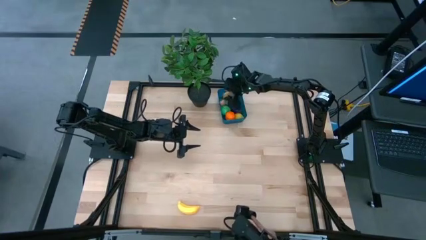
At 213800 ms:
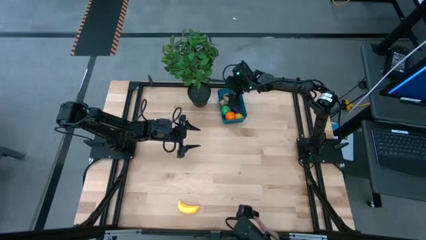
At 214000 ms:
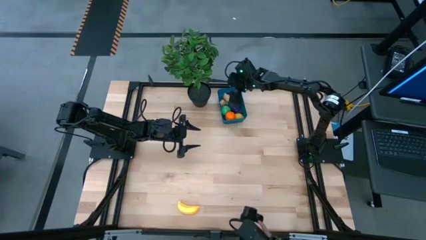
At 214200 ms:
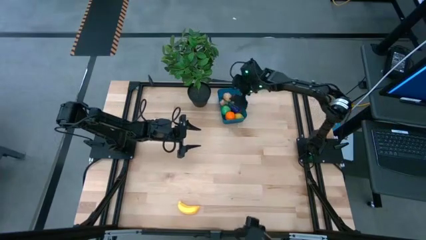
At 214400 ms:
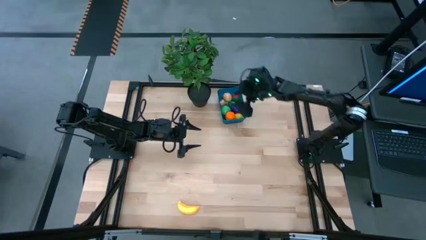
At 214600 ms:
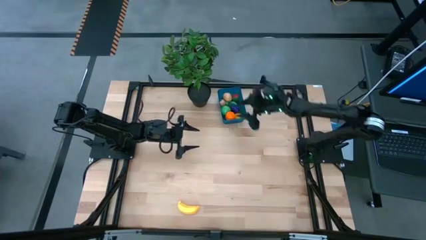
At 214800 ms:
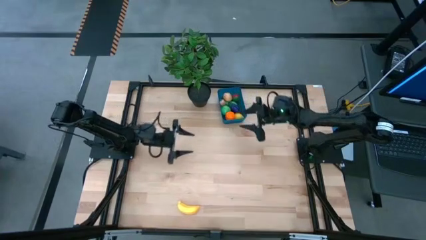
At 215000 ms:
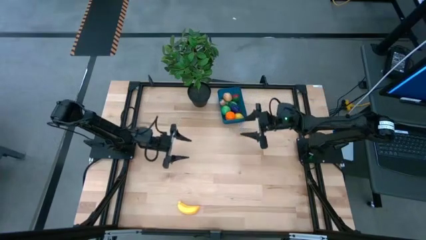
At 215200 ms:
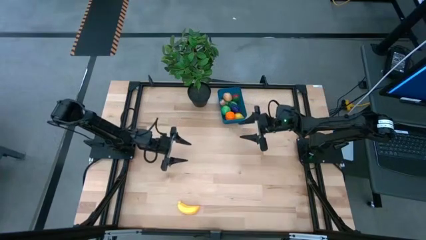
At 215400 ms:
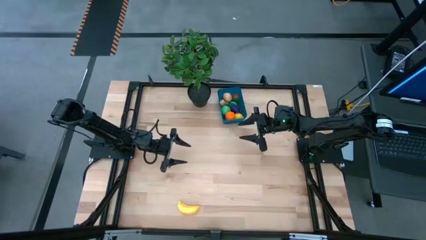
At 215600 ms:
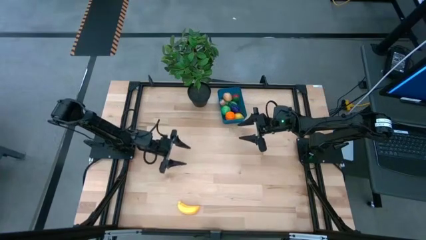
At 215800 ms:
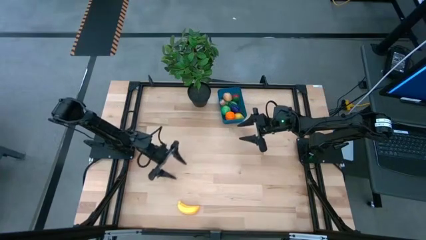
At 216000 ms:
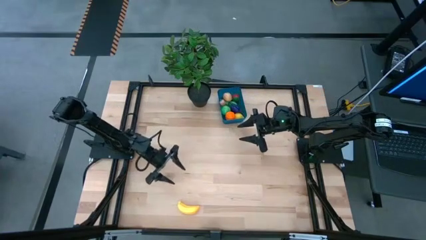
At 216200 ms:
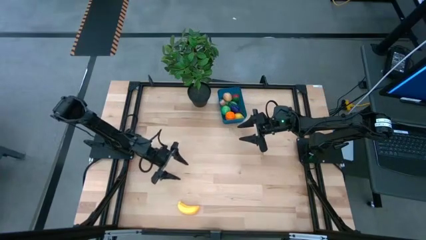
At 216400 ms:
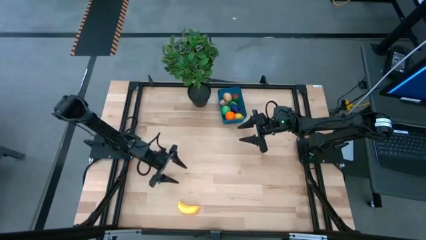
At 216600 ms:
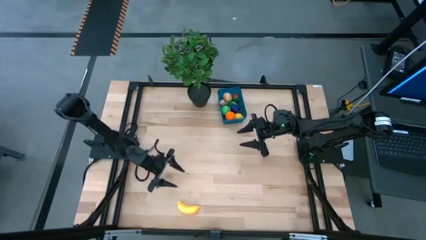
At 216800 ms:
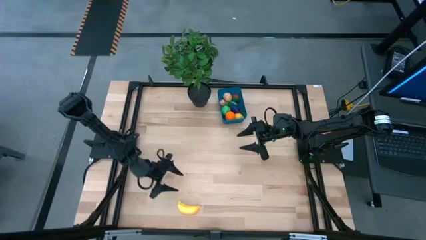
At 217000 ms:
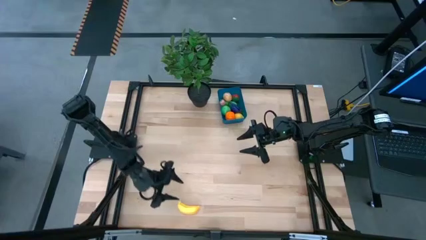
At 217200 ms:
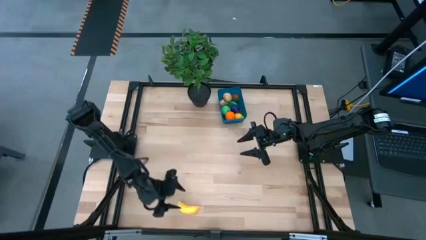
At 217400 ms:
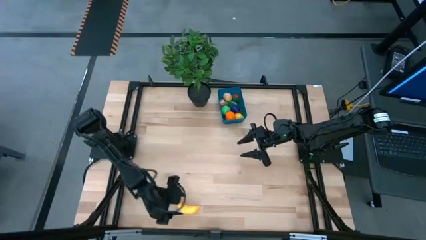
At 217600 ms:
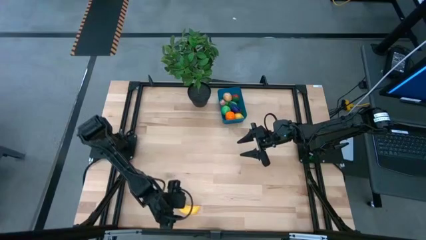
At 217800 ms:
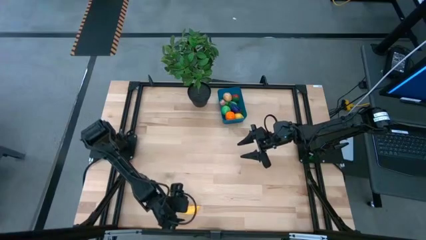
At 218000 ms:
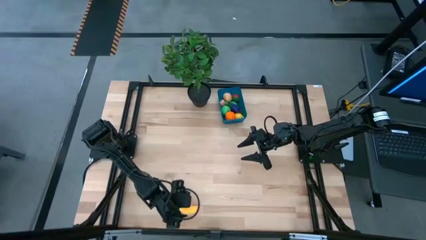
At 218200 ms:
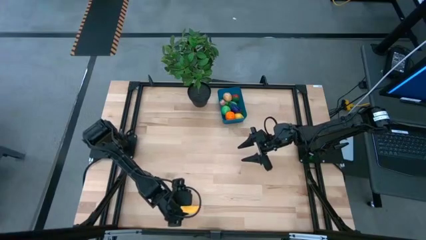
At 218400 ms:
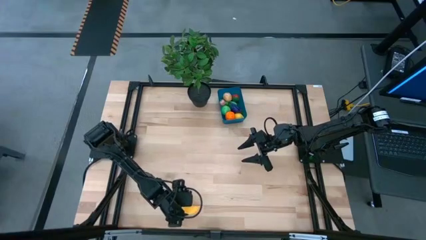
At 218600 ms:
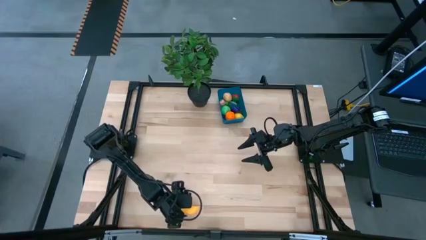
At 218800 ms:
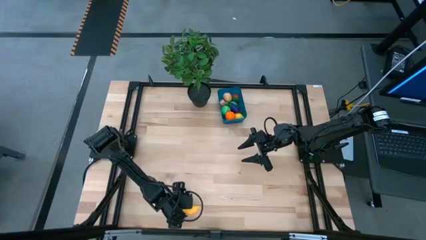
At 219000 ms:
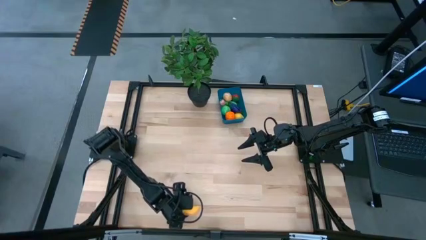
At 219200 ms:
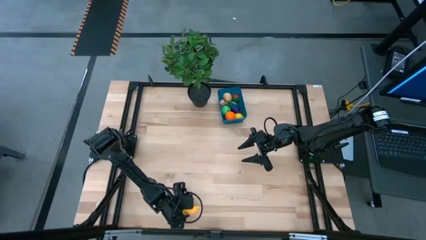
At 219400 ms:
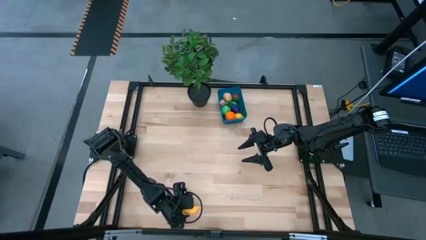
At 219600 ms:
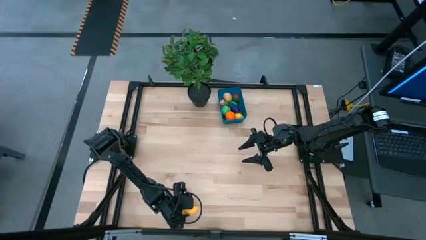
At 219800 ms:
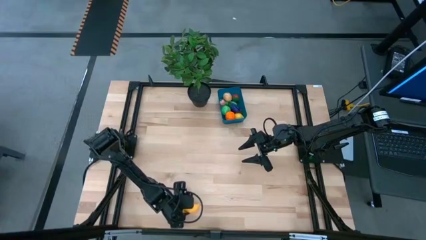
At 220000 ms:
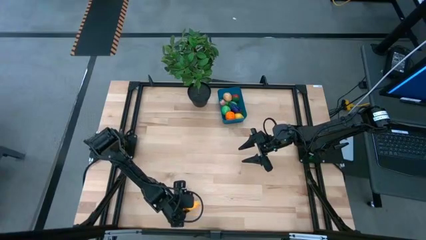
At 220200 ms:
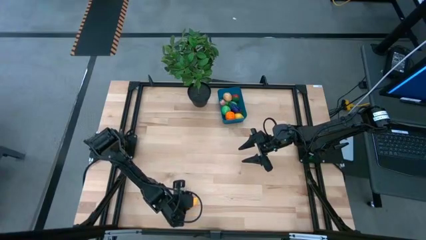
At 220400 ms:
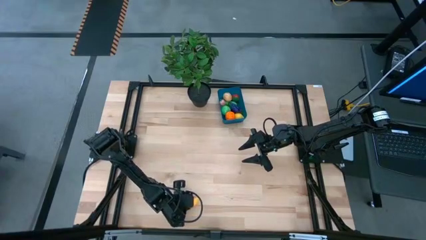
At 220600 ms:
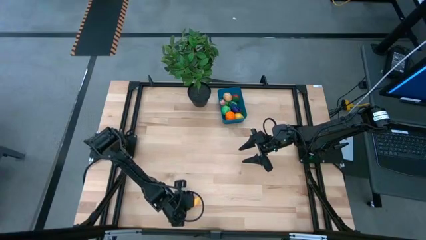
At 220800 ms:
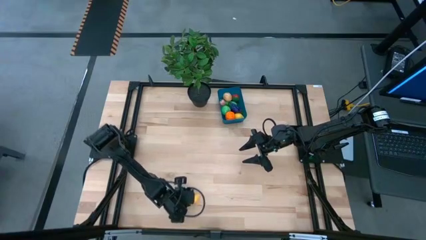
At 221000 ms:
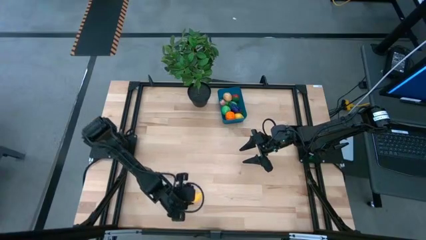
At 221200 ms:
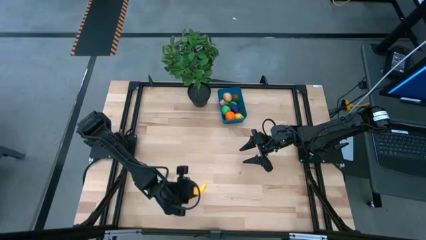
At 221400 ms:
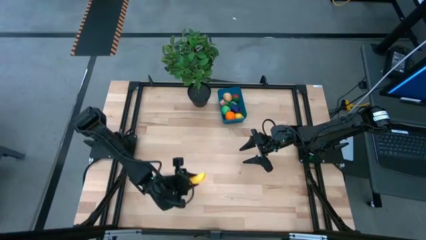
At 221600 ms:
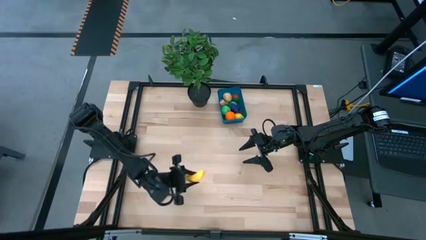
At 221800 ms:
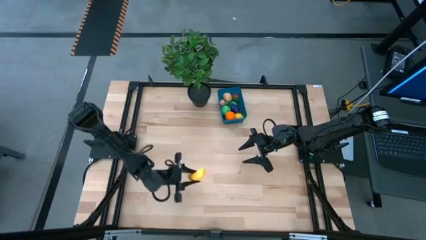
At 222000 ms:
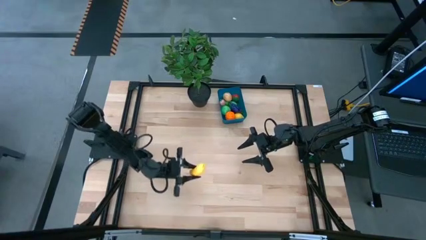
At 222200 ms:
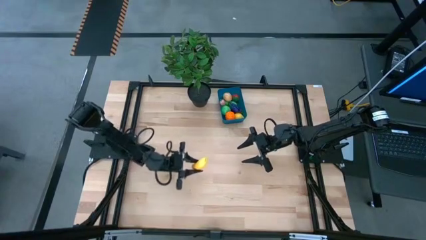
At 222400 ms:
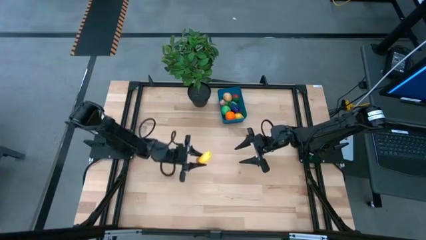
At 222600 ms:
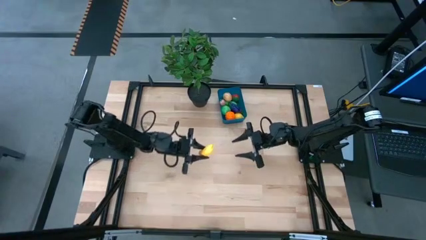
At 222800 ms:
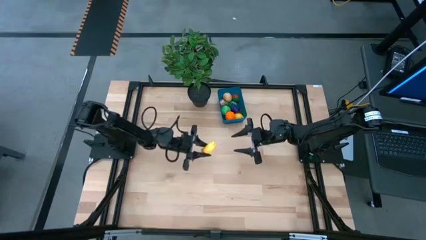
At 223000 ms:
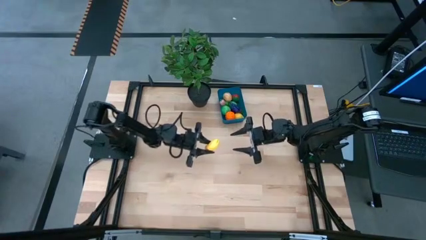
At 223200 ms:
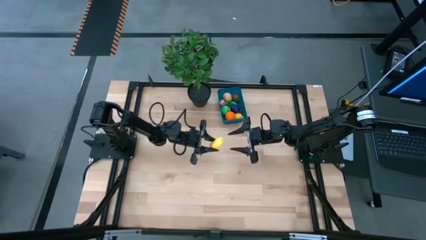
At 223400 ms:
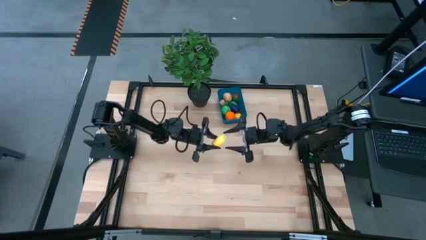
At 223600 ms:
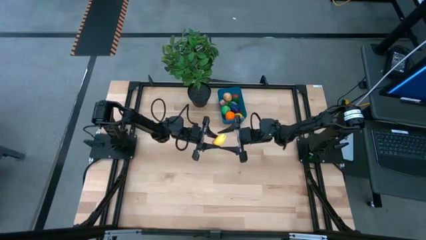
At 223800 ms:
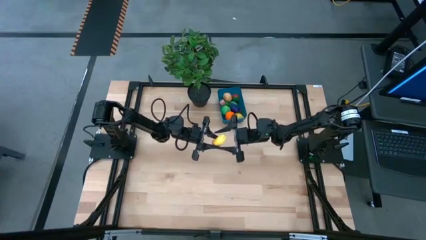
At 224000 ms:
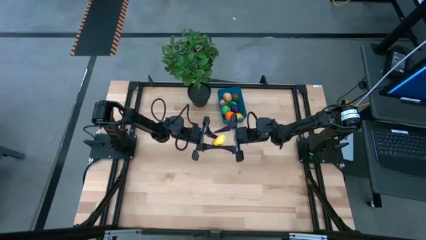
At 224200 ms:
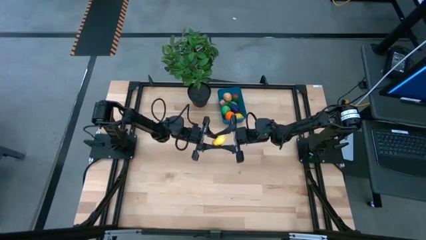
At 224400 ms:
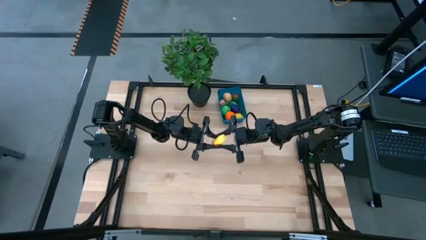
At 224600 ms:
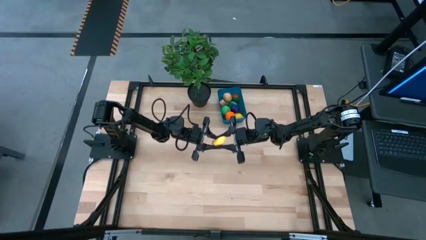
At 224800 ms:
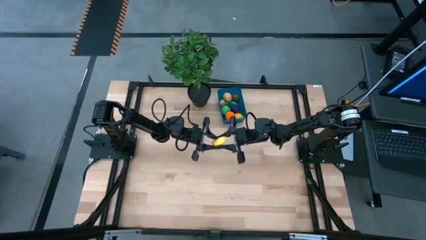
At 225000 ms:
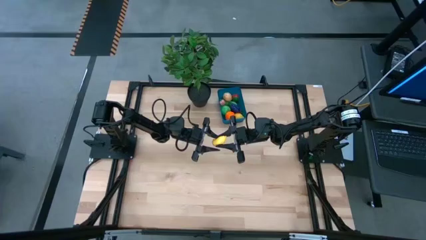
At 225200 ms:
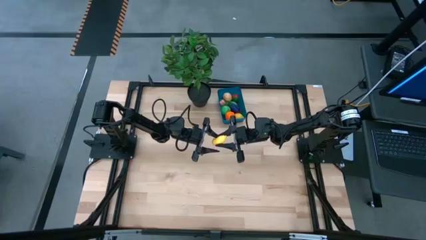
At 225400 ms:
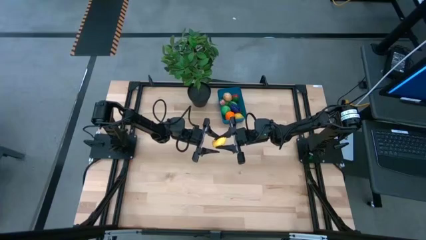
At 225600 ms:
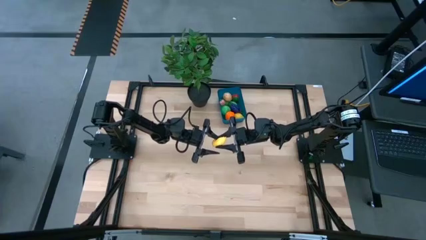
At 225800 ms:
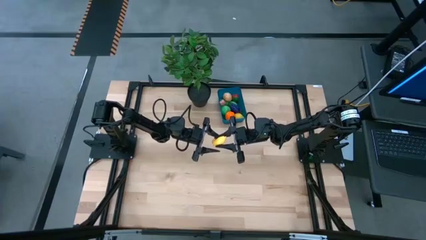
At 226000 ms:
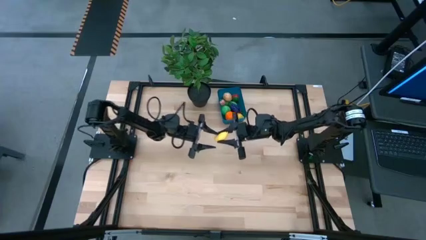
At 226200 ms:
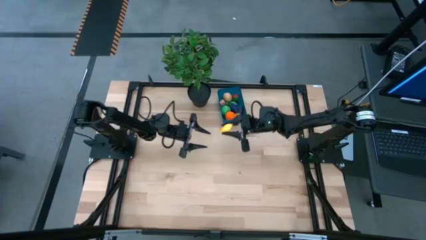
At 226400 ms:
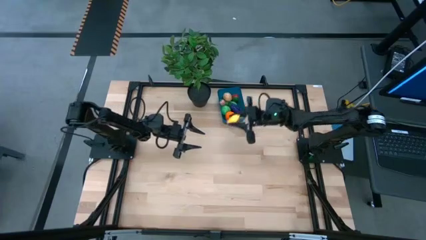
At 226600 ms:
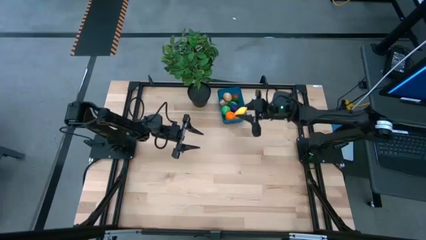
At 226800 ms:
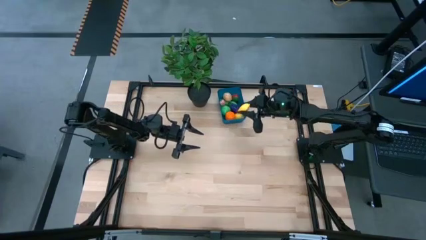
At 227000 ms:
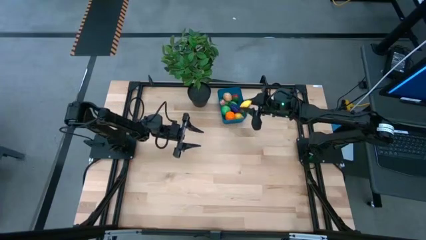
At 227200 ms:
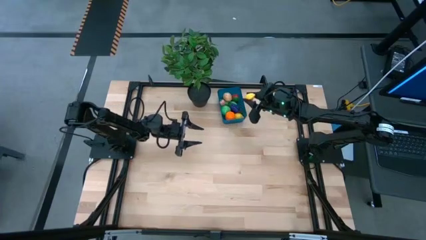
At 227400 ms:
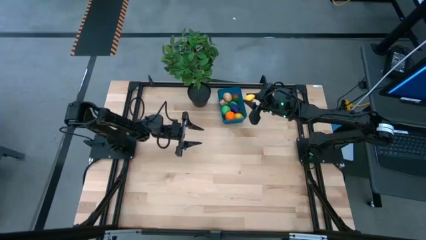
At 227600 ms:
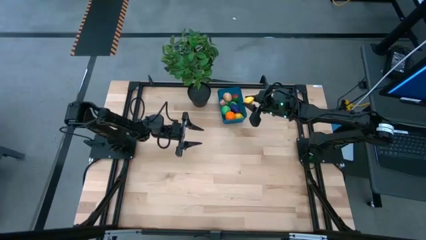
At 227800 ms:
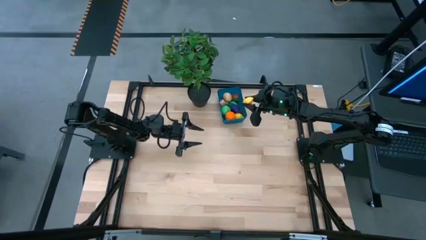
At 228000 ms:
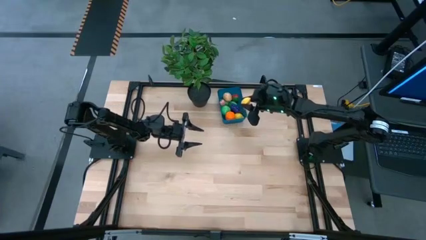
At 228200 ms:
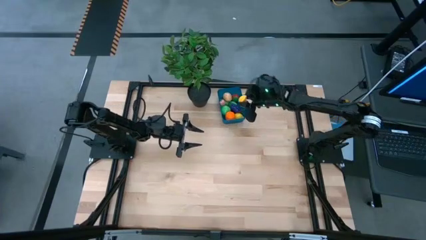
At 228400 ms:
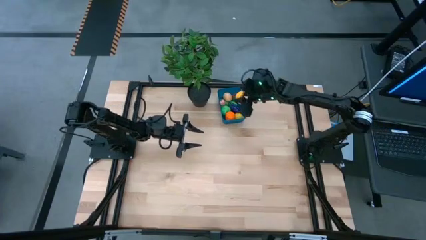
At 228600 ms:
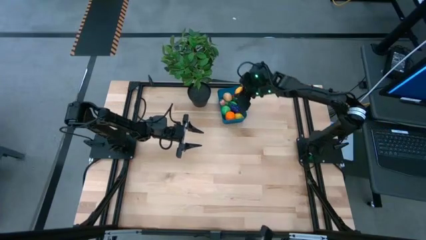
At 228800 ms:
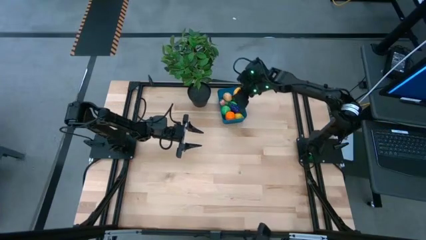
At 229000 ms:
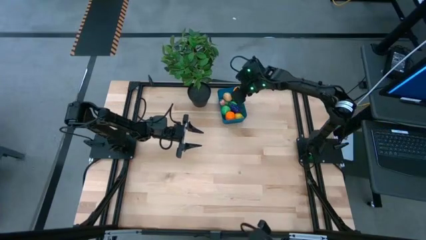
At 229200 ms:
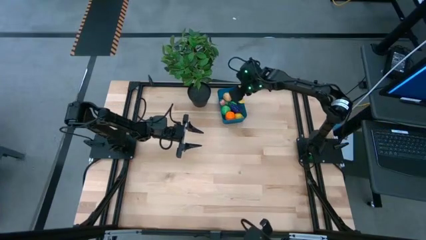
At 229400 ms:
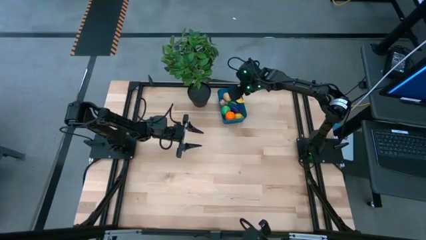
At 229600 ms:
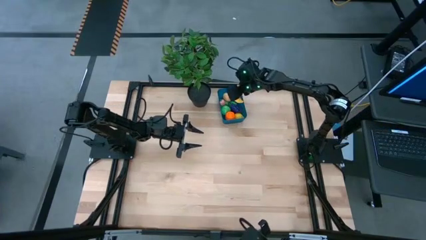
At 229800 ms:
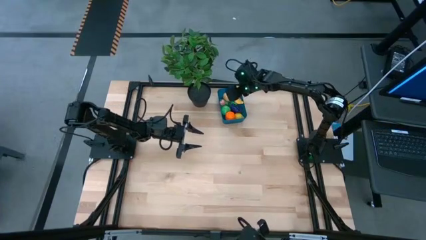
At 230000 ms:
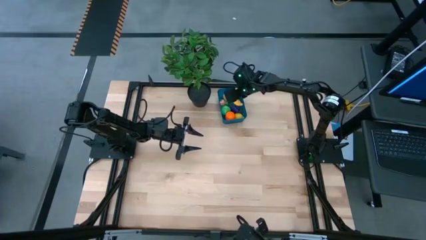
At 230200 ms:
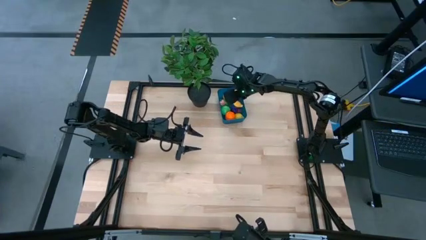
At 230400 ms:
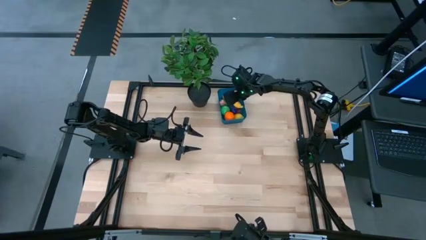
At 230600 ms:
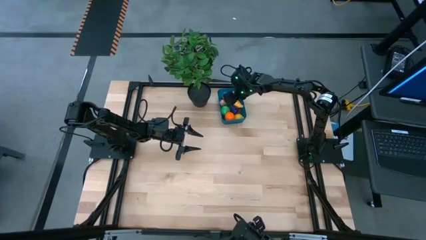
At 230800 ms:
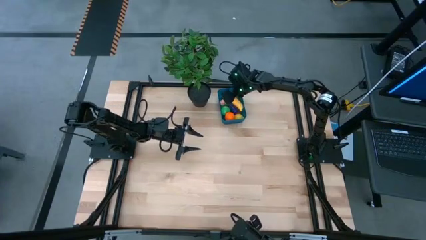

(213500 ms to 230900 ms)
Task: Pick and placing Produce into tupperware
Put the banana into the blue bin
